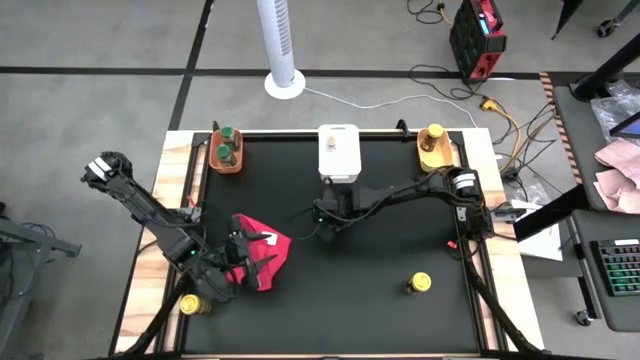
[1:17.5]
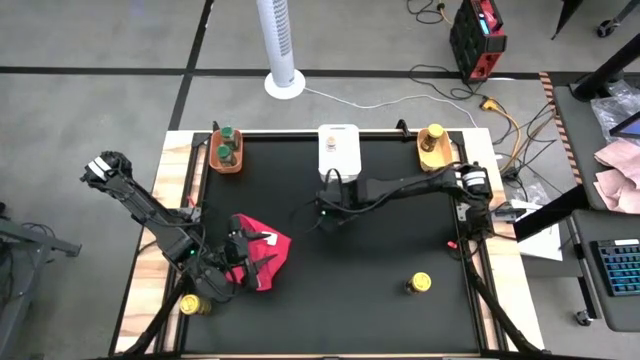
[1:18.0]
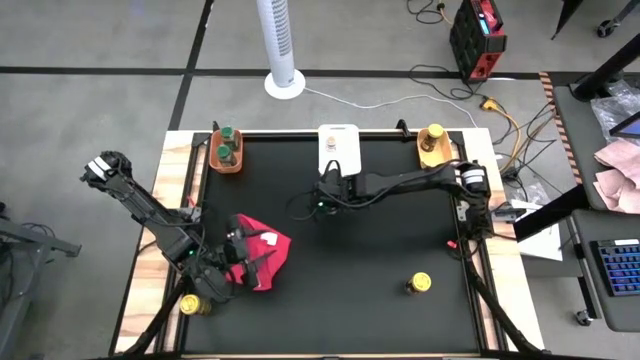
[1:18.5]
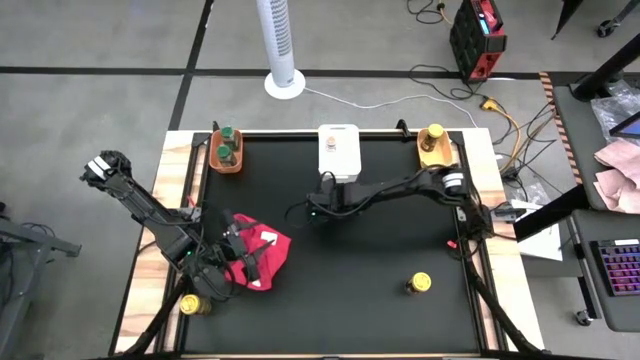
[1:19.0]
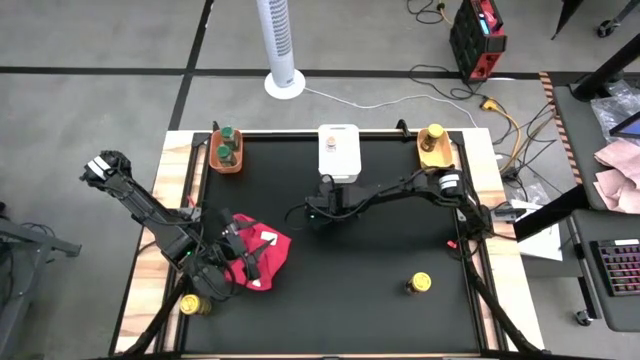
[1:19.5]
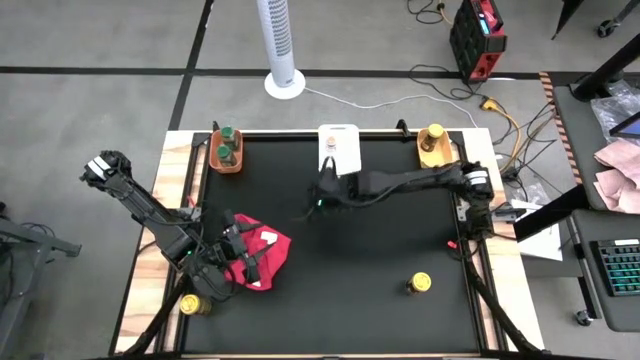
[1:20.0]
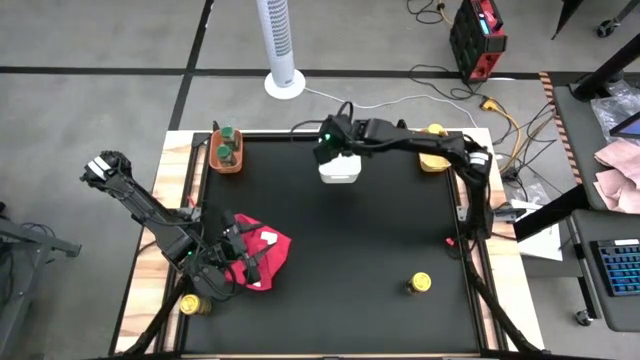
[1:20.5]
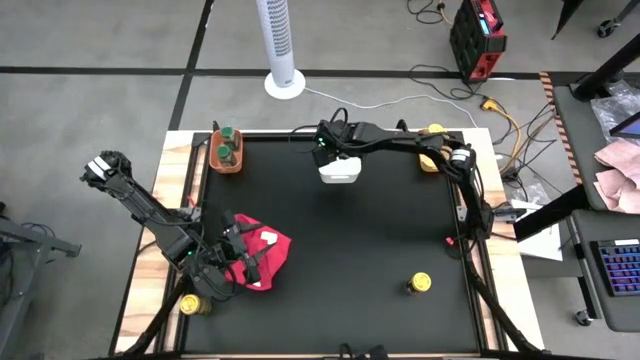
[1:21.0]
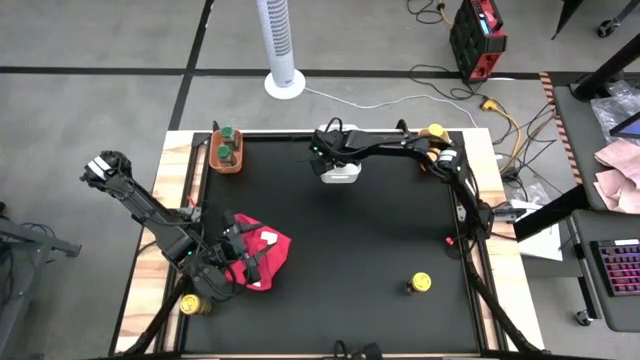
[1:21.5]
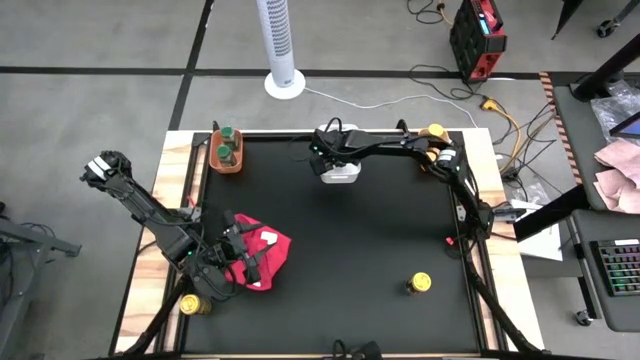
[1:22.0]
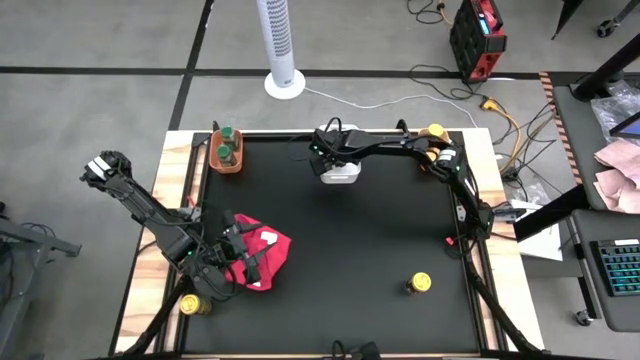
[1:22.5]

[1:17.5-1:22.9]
Task: Sort spices by type
Put the brown seasoning bottle into the white bin

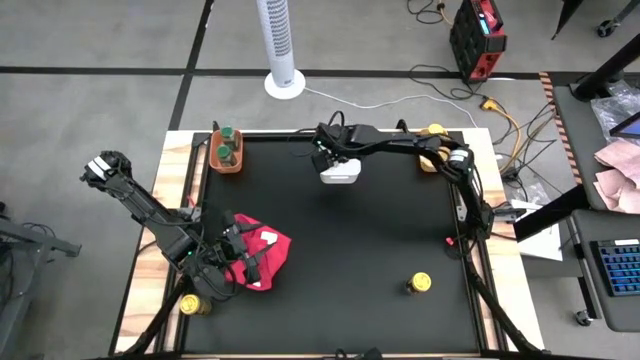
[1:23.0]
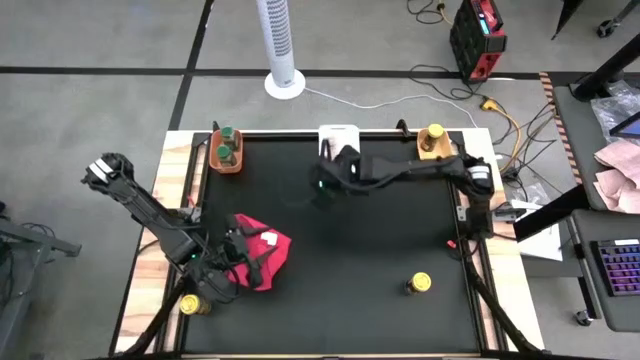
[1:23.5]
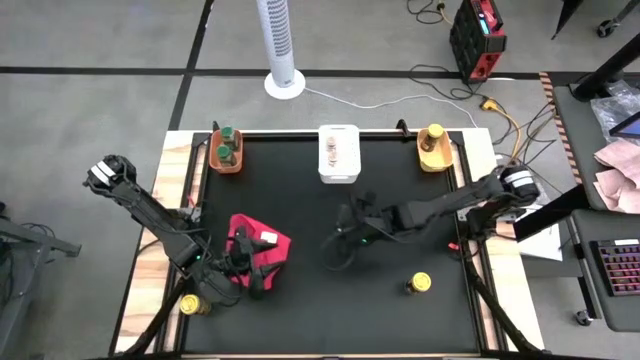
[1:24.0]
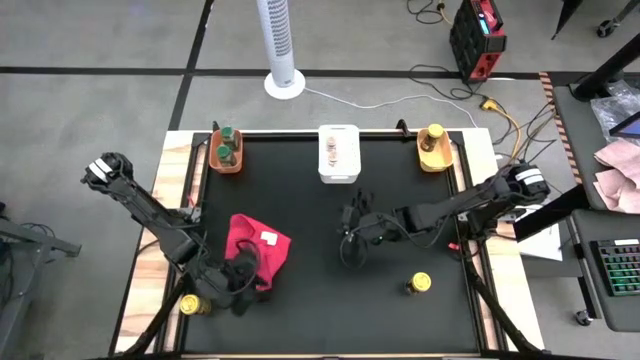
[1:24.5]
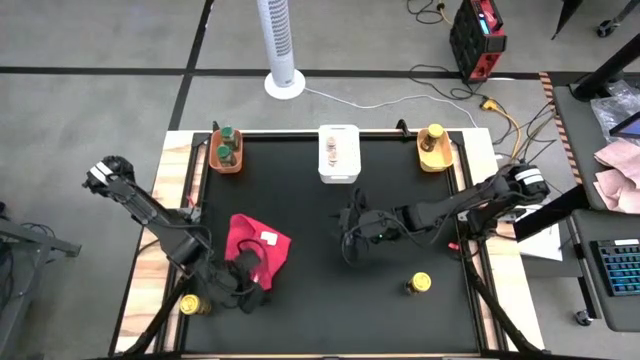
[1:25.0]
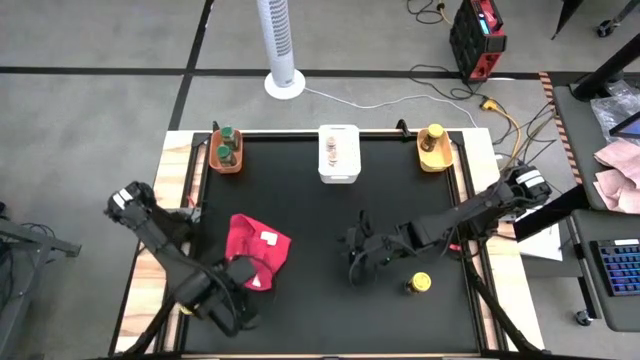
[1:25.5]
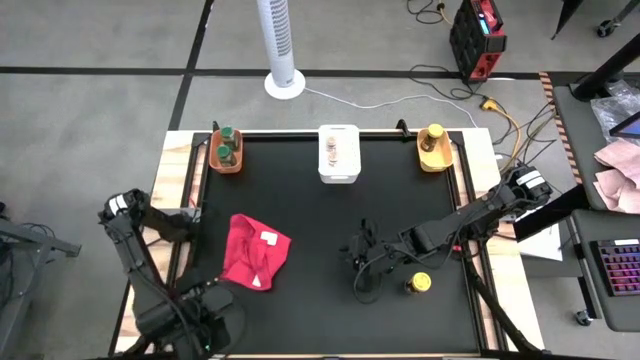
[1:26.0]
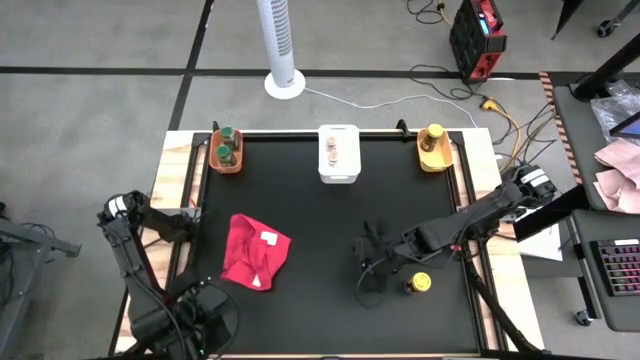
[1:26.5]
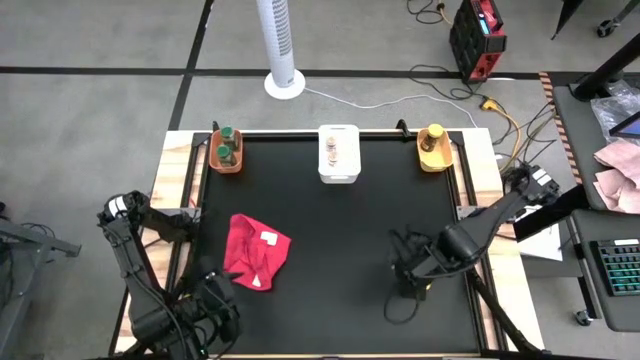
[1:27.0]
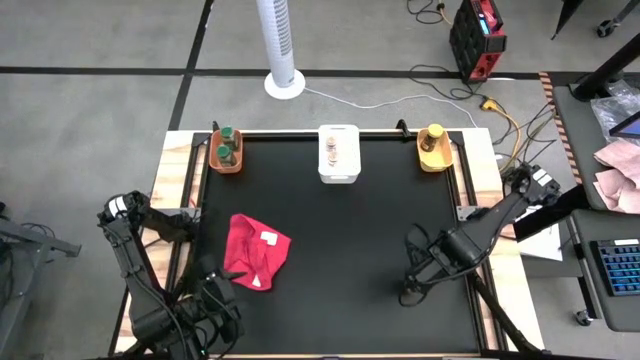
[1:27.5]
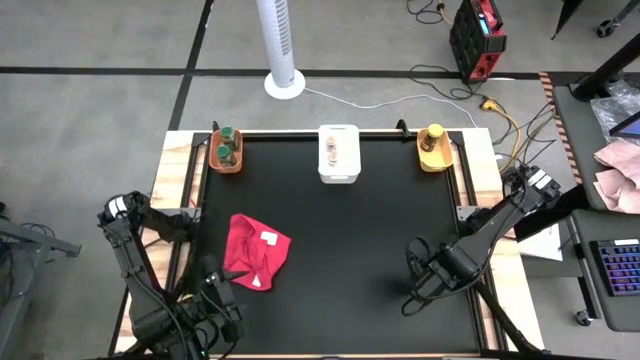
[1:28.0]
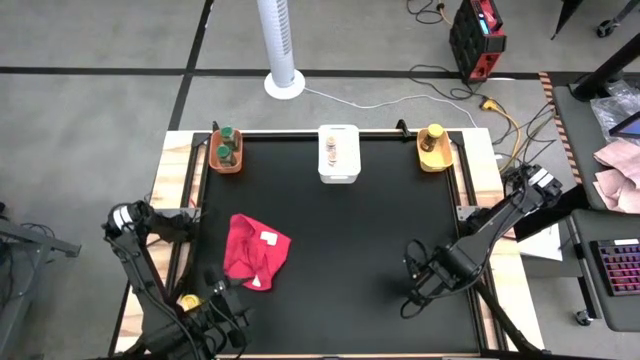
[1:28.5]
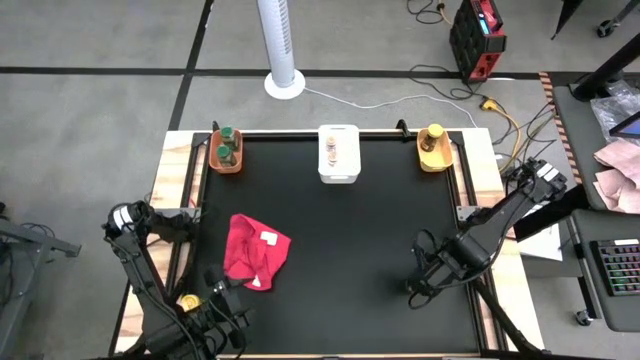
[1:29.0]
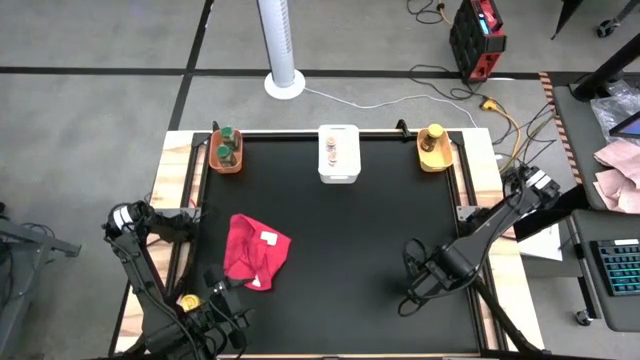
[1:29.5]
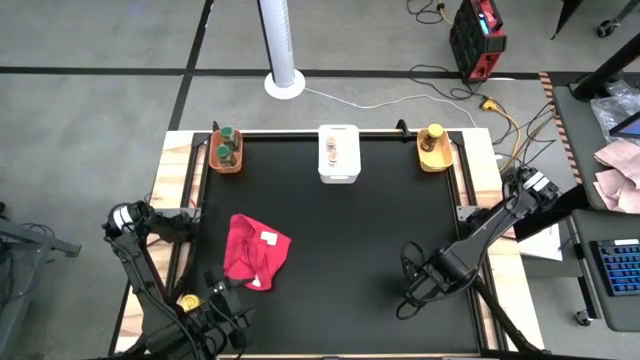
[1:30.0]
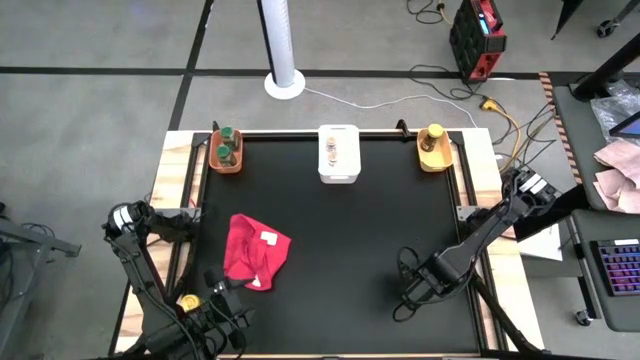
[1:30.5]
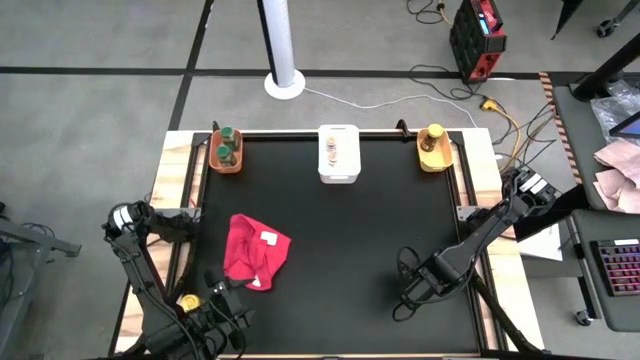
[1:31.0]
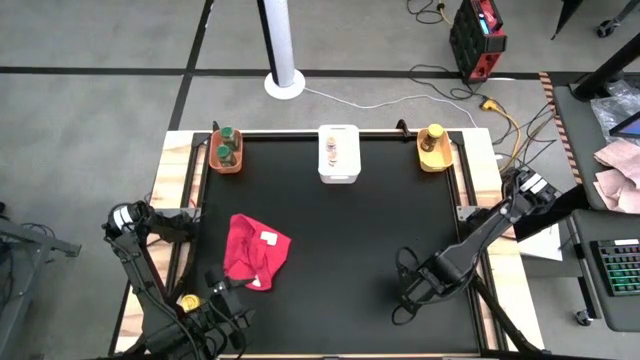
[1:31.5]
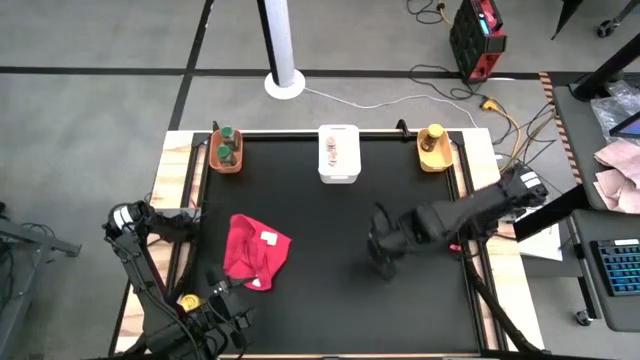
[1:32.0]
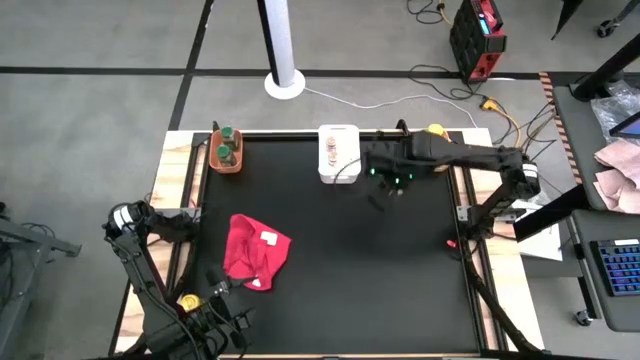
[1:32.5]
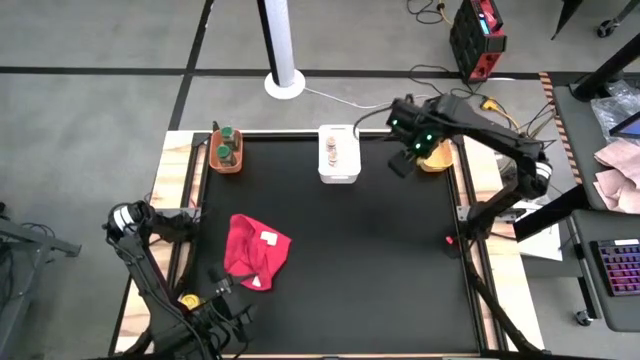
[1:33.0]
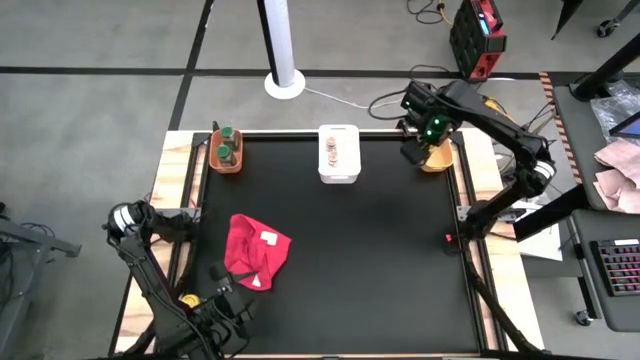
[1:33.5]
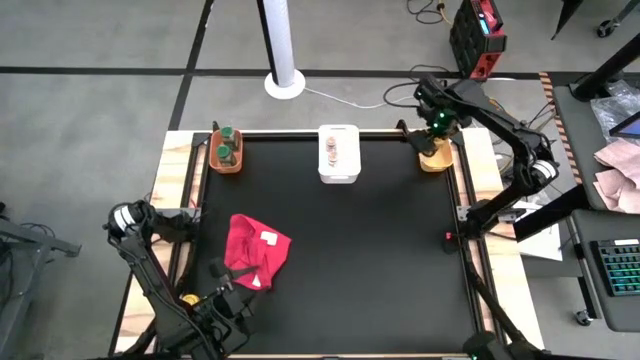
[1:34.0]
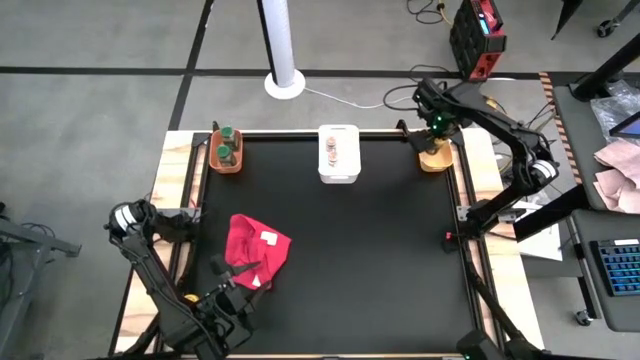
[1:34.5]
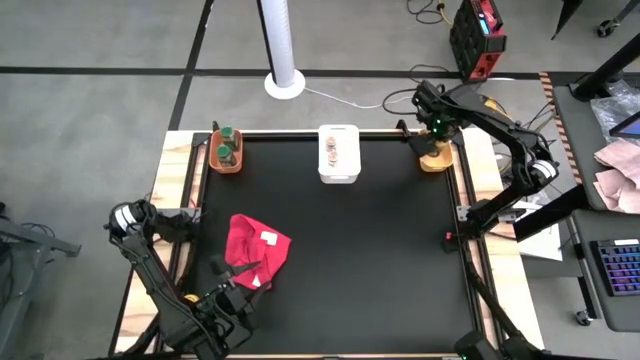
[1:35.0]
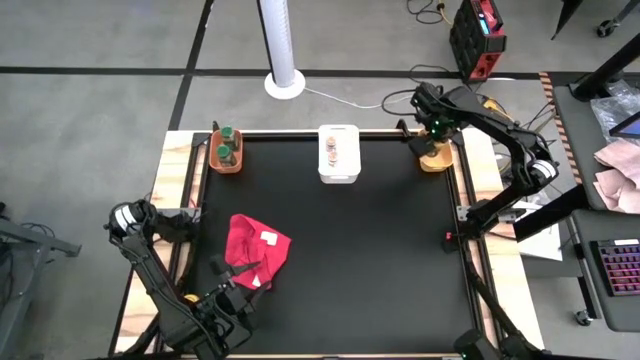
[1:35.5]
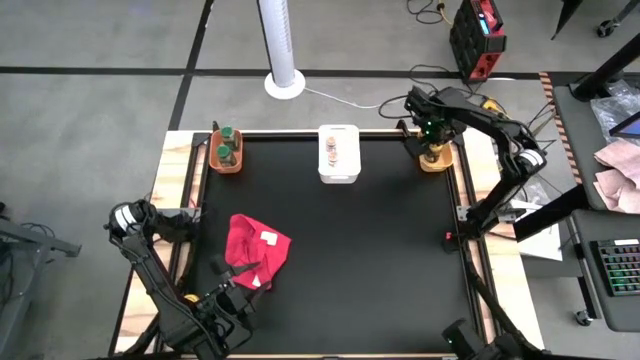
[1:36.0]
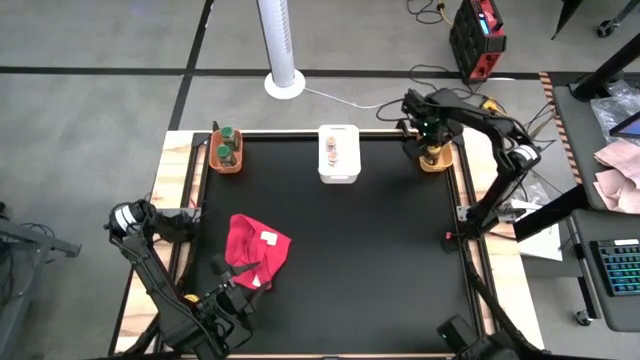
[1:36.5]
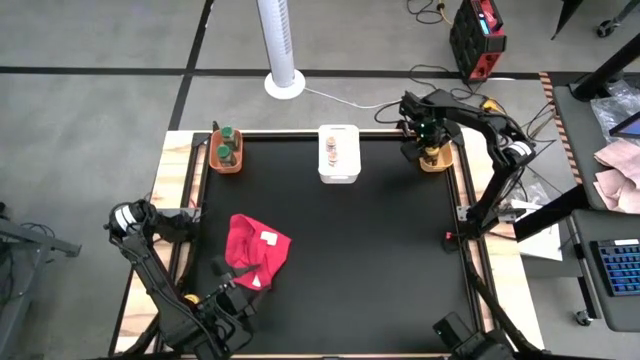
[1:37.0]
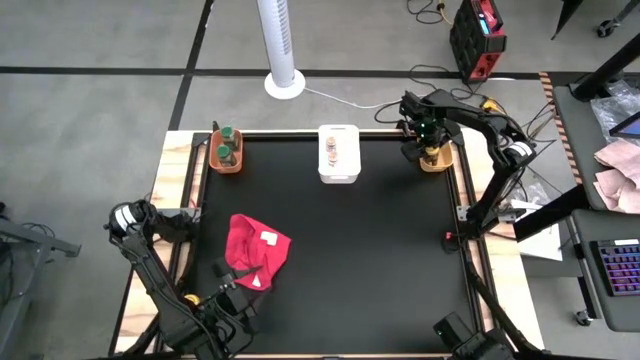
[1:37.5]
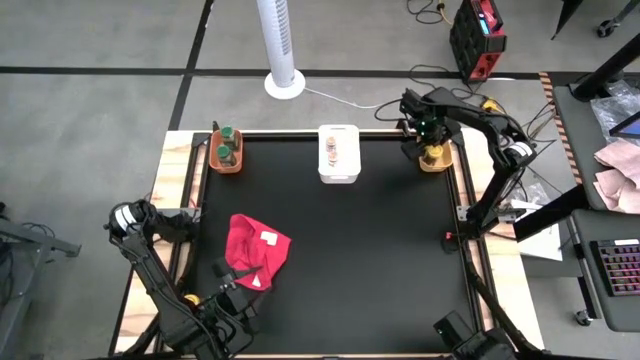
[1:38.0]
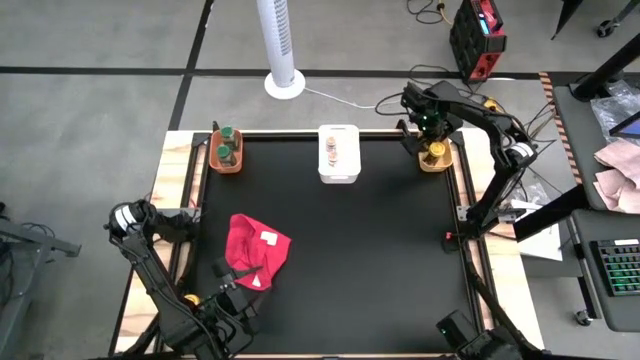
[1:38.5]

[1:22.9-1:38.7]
Put the right yellow seasoning bottle into the yellow bin
